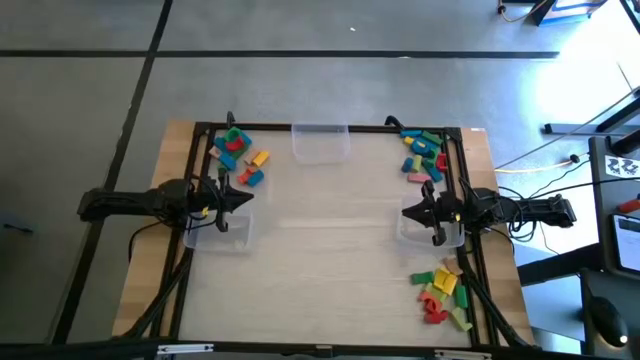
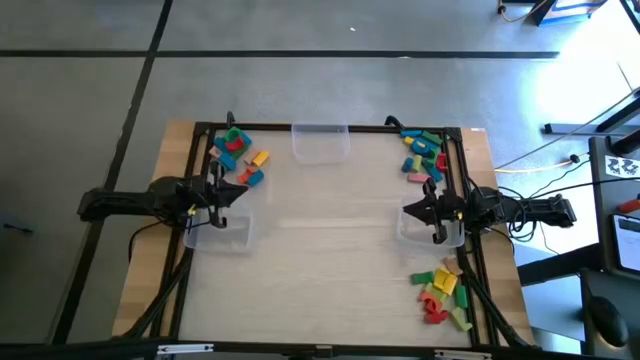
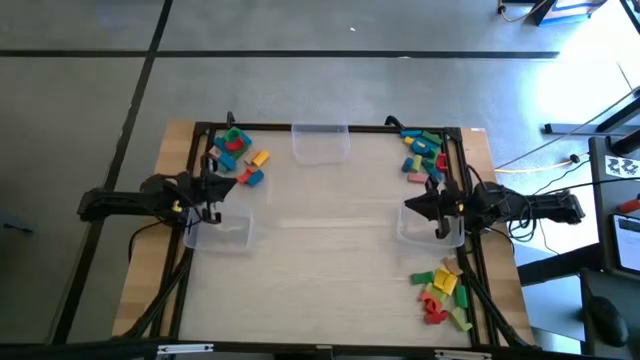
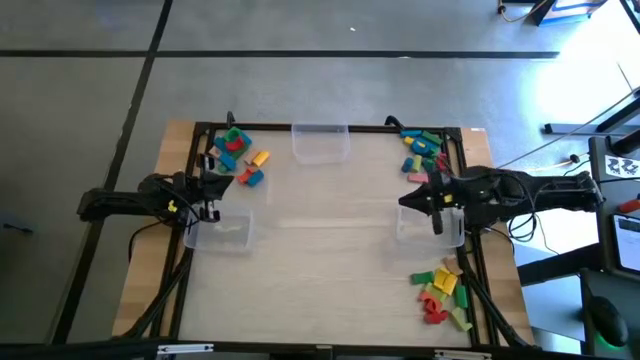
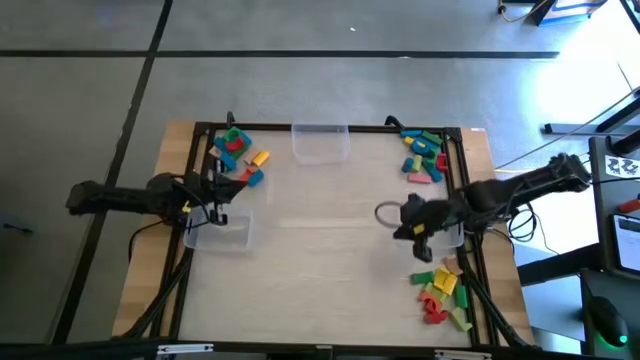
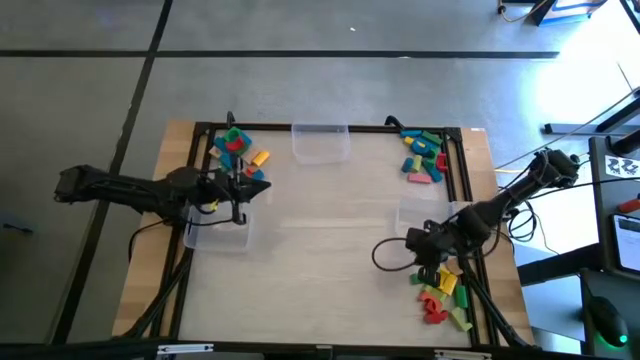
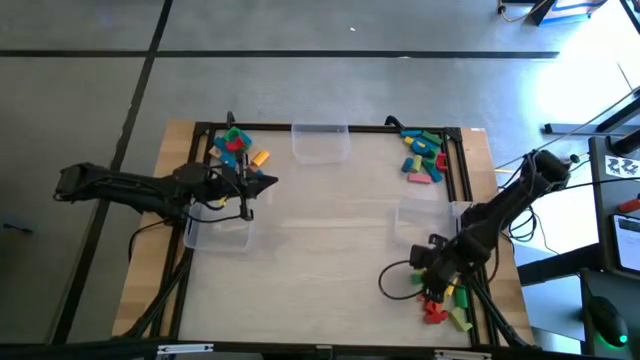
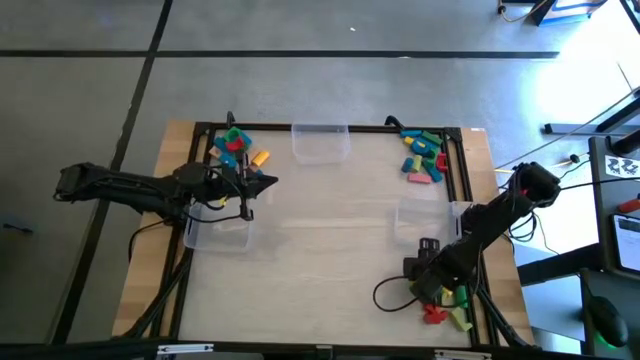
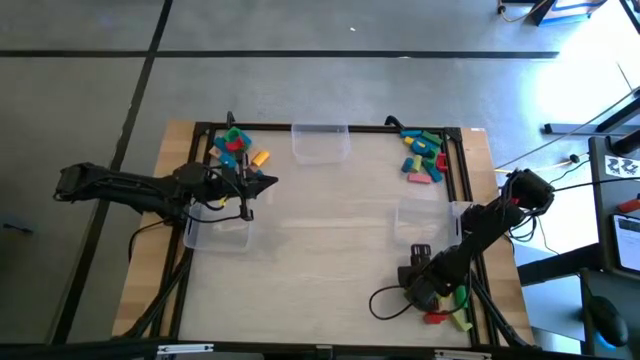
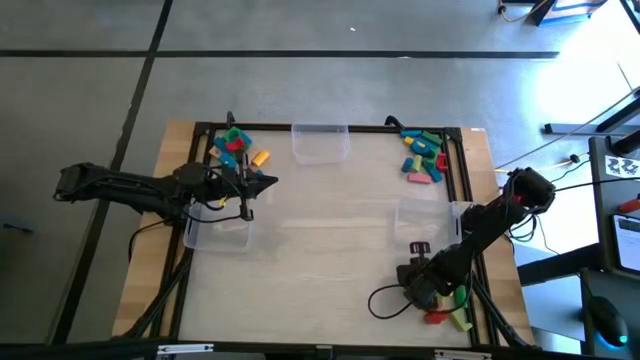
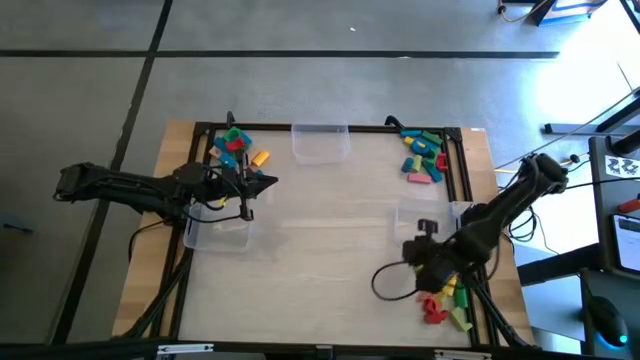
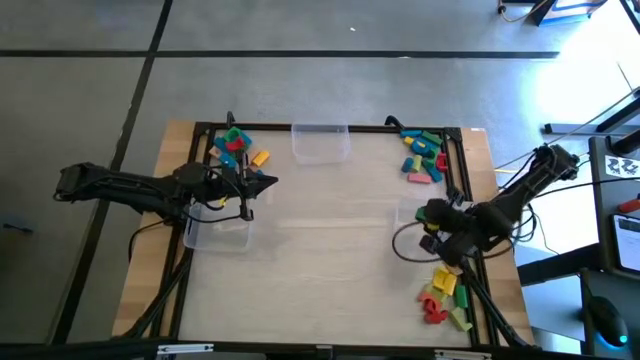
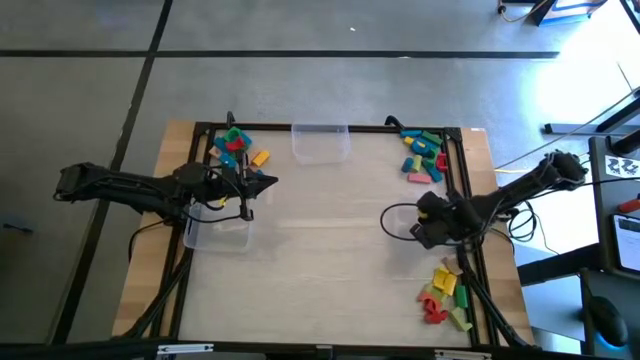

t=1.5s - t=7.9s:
Task: Sort blocks by size
Put the green arch block into the bottom right transparent bin

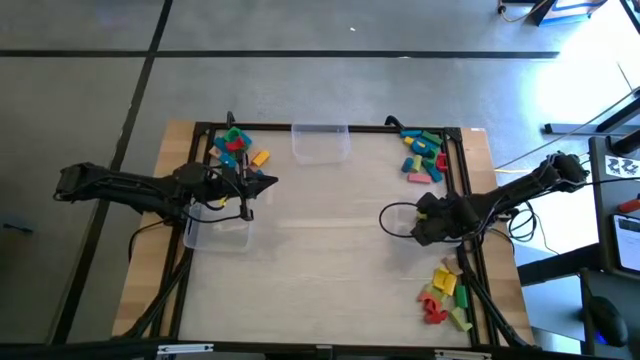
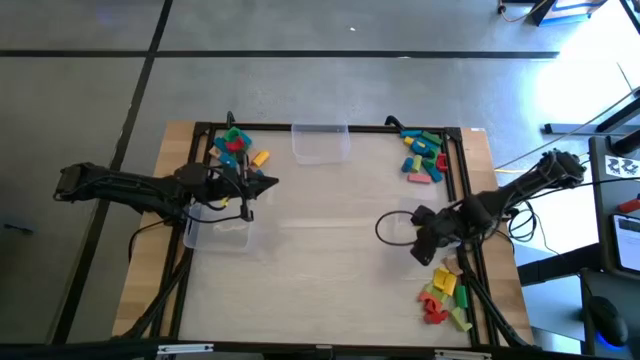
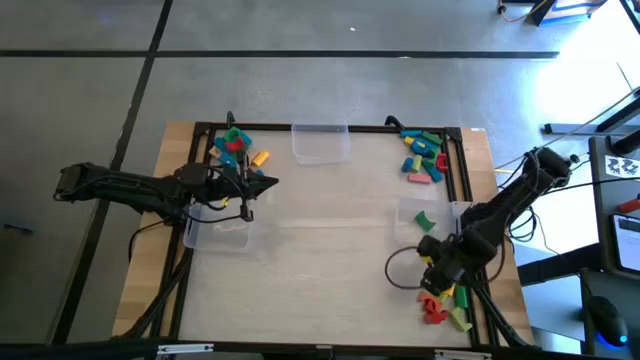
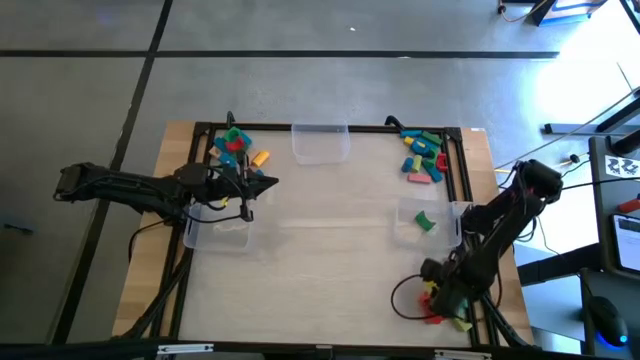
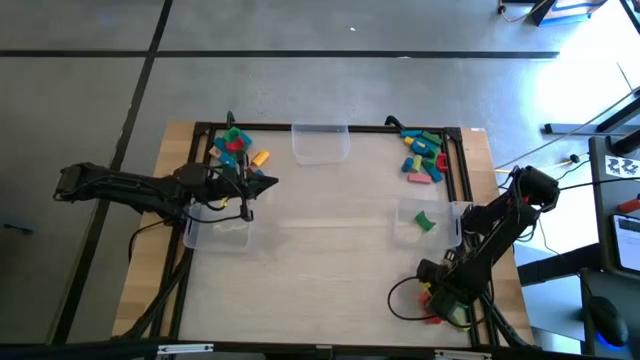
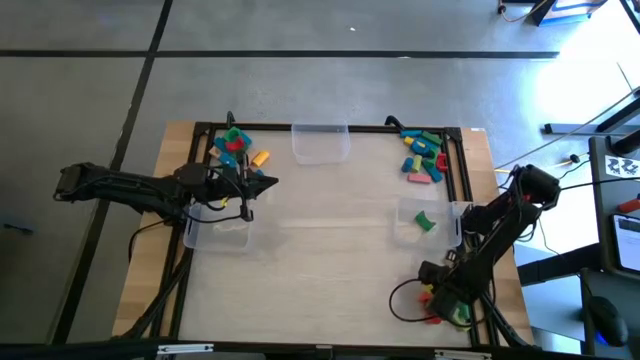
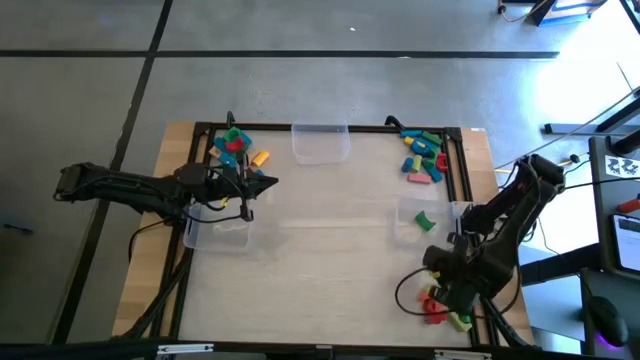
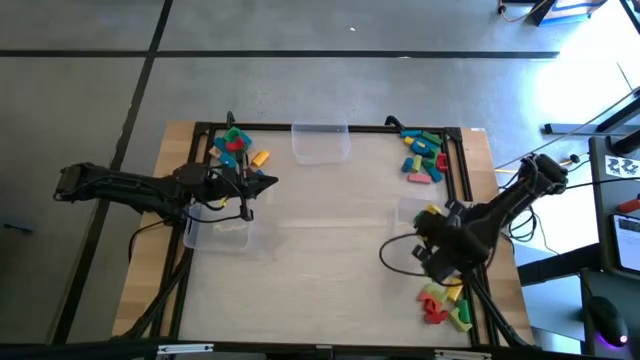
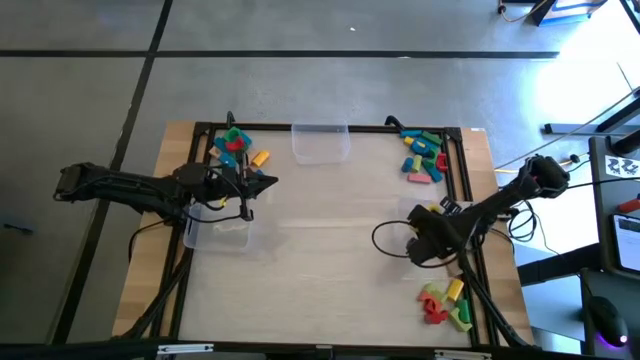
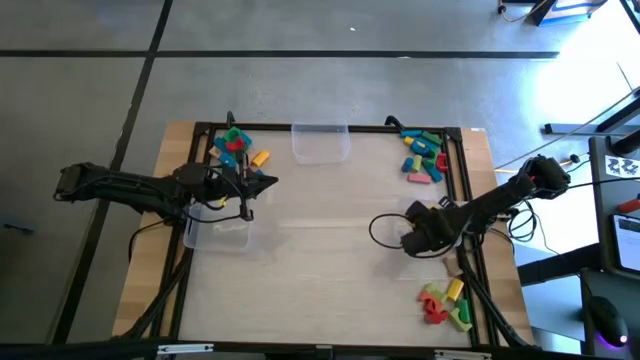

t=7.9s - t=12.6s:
Put the yellow arch block into the bottom right transparent bin

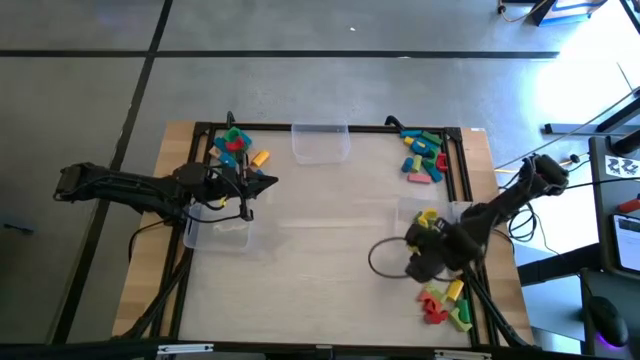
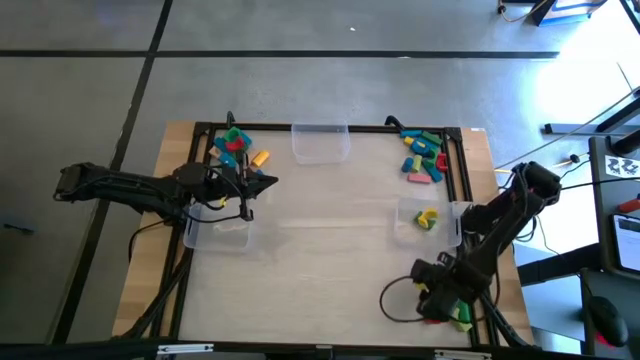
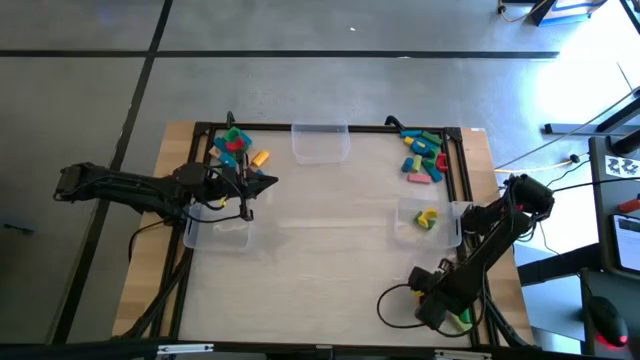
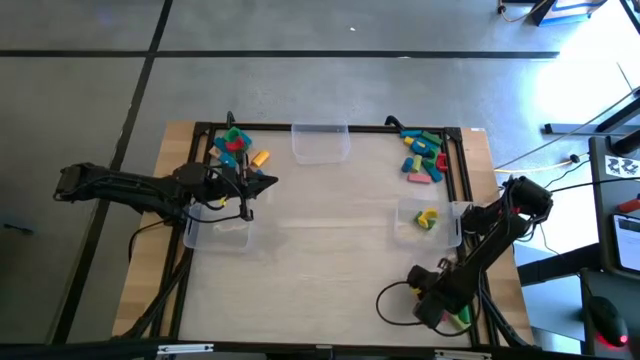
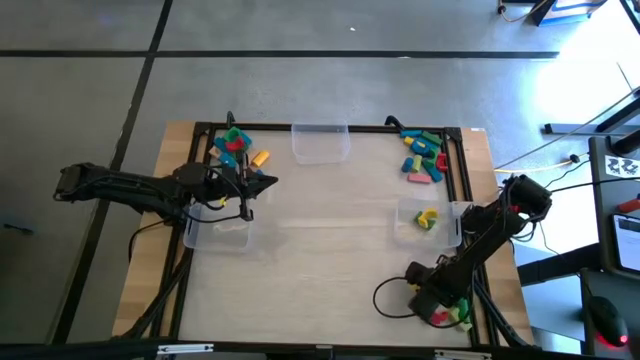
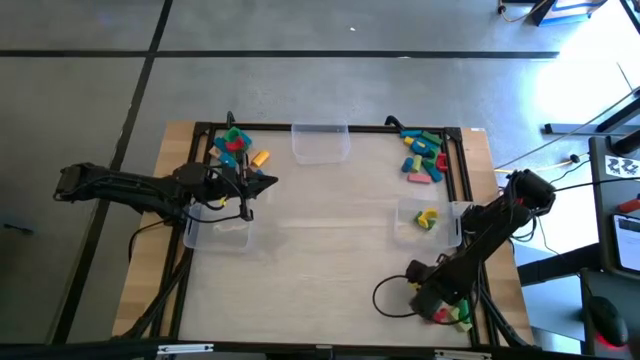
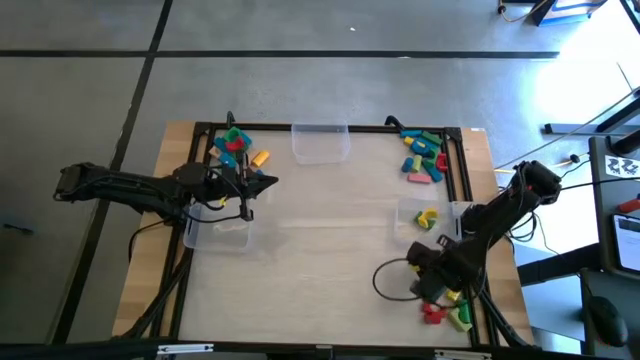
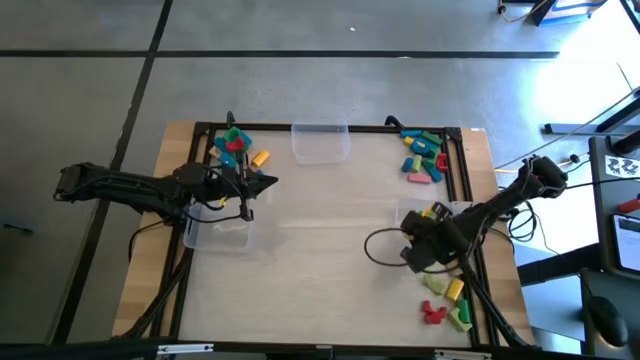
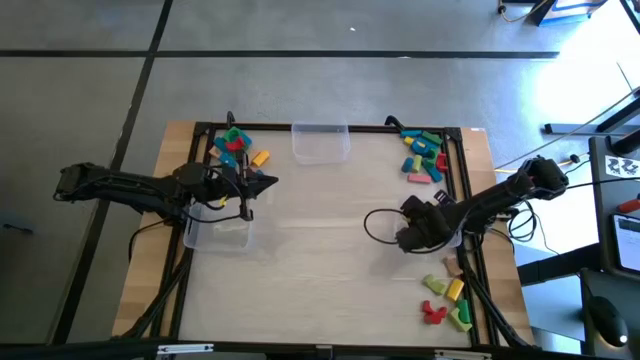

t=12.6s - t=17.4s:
Put the orange arch block into the bottom right transparent bin

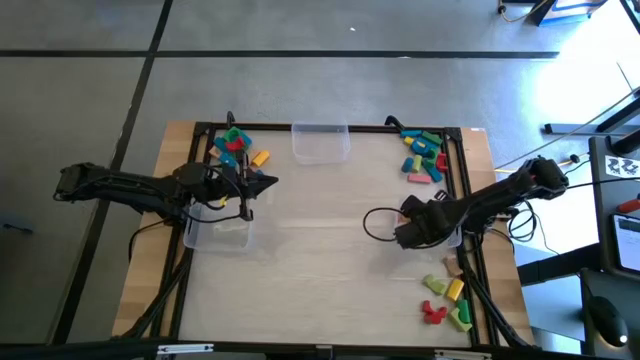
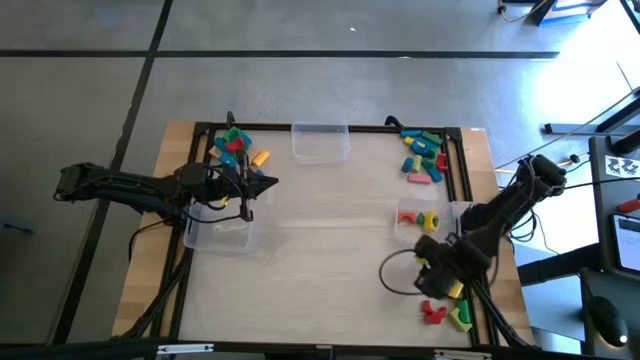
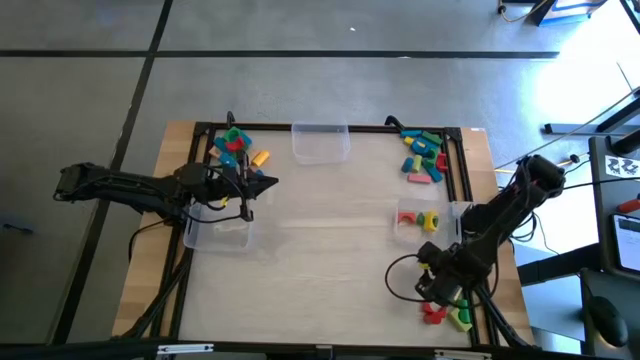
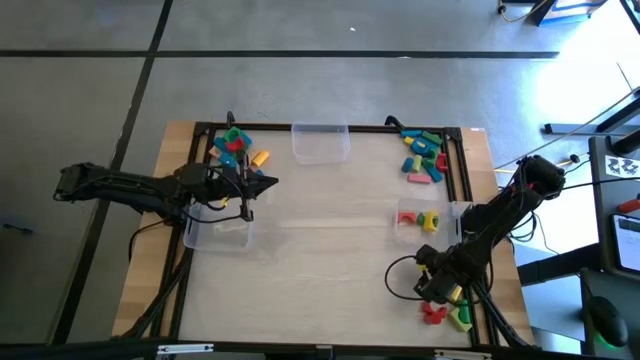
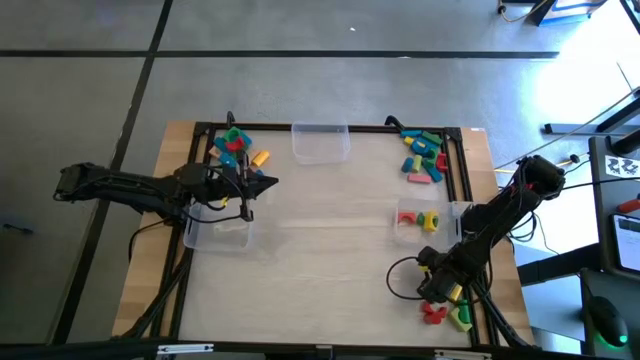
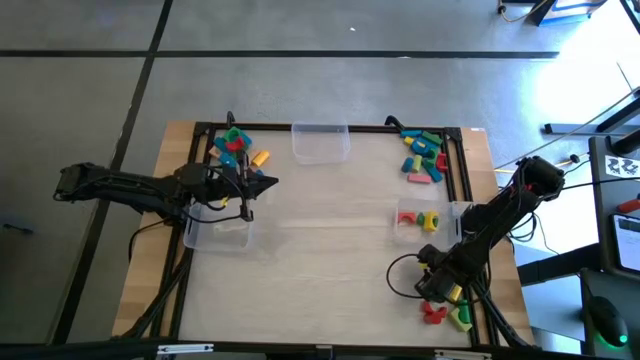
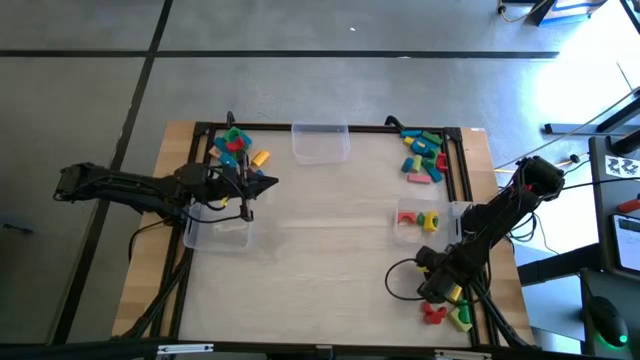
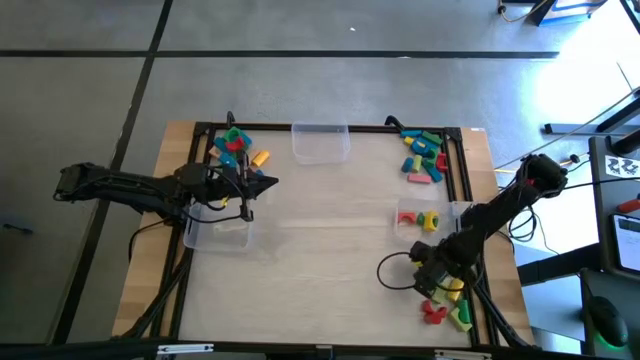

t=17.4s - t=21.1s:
Put the light green arch block into the bottom right transparent bin

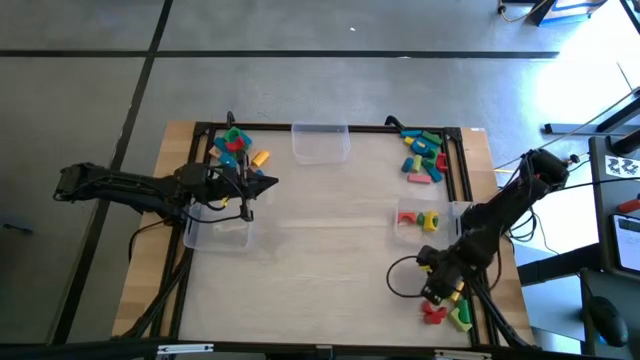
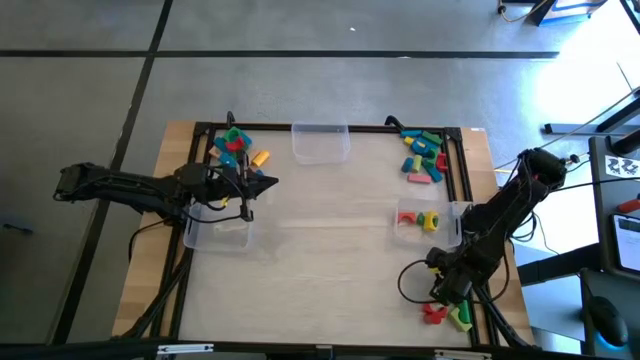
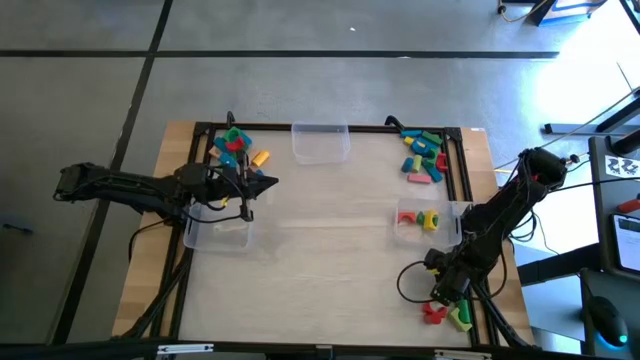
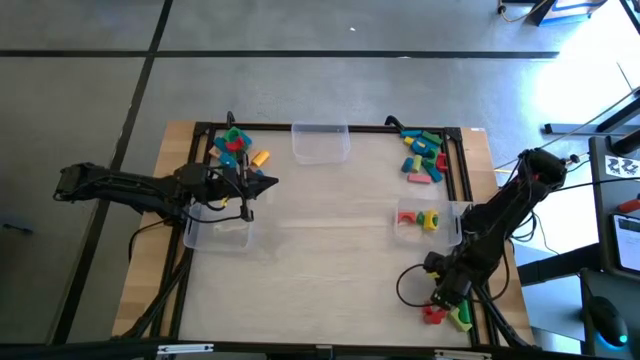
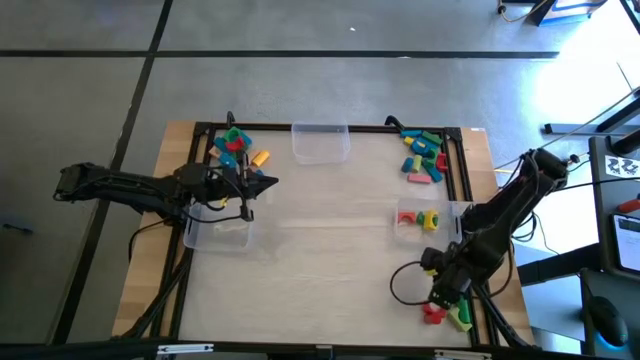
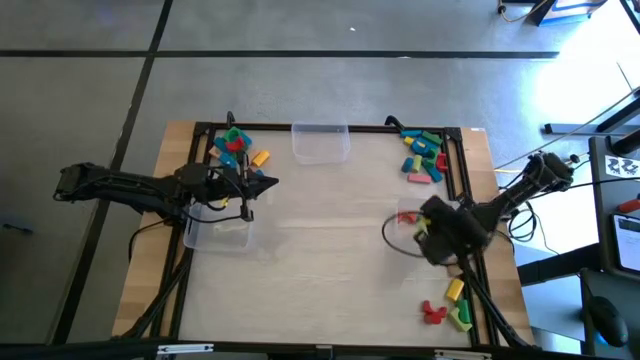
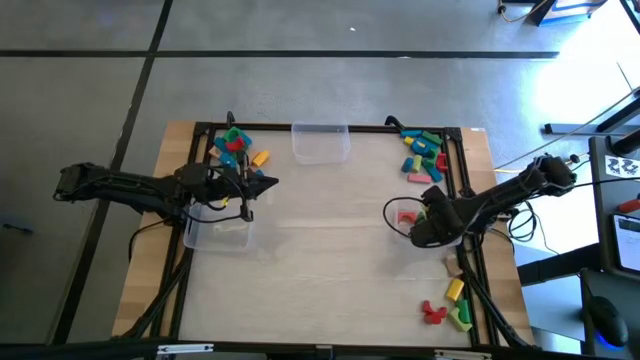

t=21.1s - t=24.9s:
Put the light green arch block into the bottom right transparent bin
